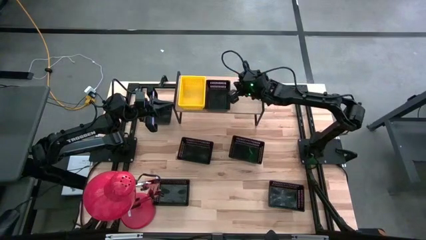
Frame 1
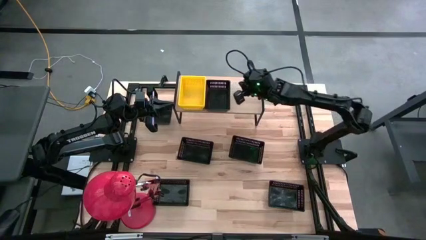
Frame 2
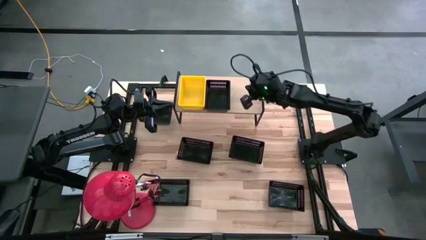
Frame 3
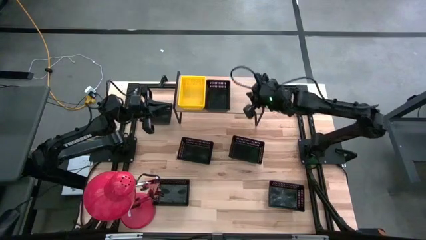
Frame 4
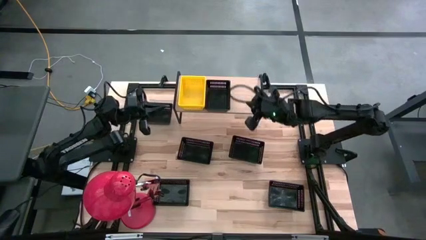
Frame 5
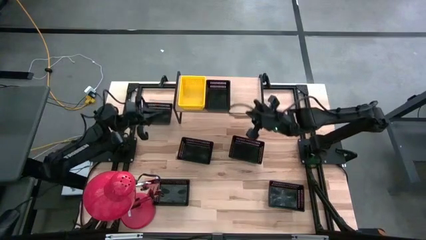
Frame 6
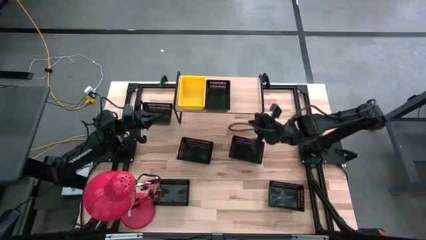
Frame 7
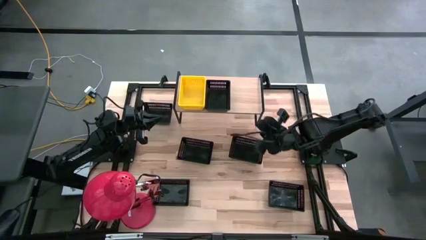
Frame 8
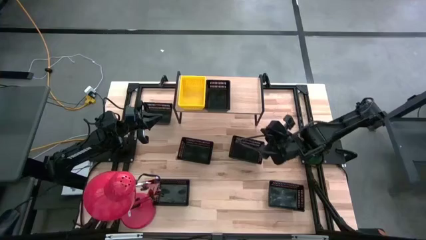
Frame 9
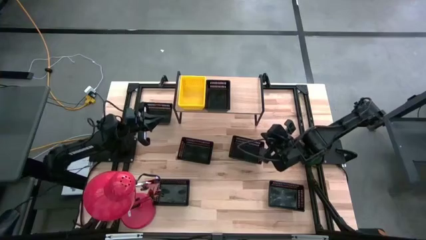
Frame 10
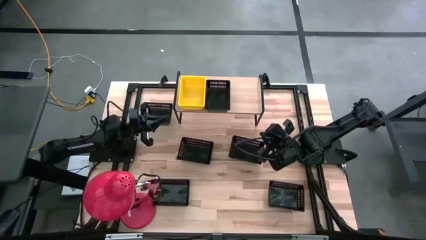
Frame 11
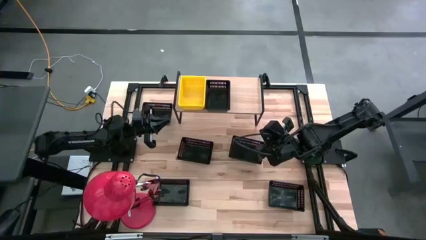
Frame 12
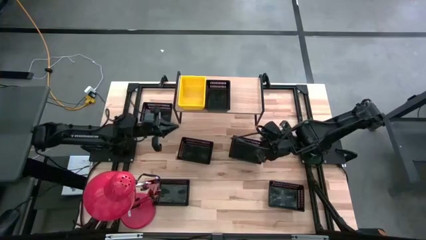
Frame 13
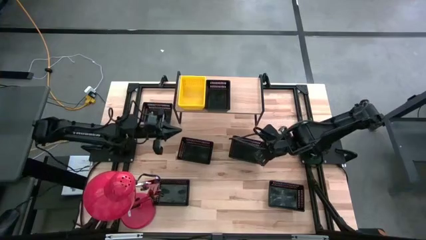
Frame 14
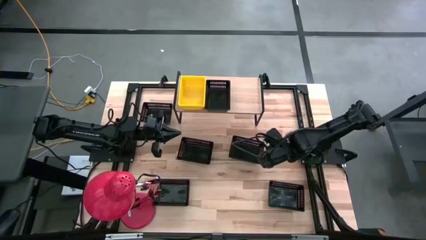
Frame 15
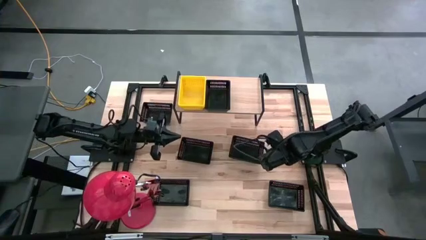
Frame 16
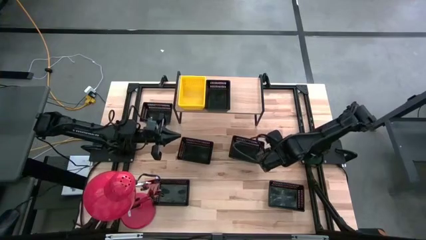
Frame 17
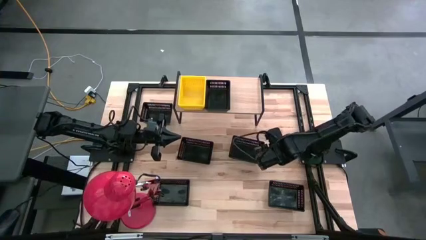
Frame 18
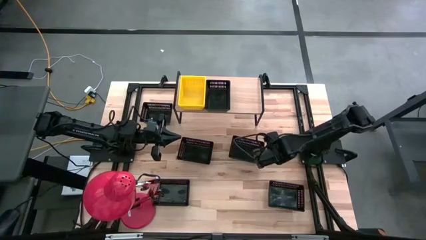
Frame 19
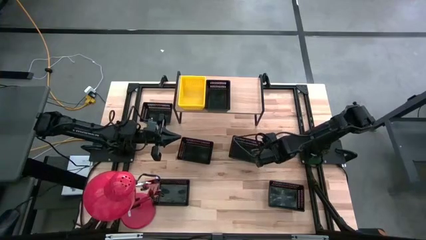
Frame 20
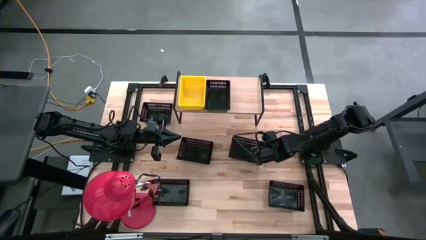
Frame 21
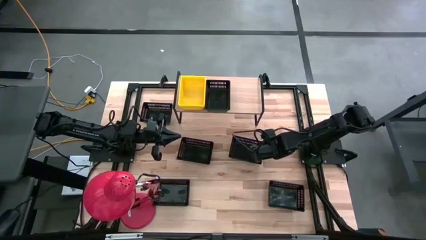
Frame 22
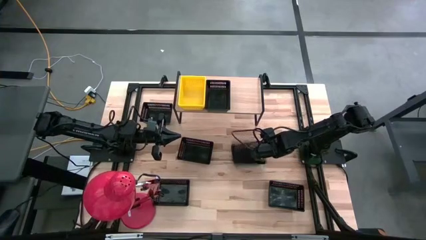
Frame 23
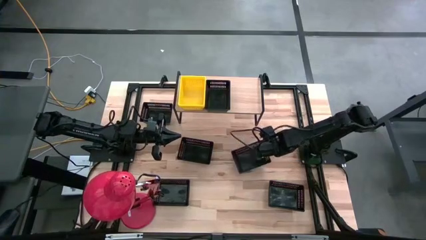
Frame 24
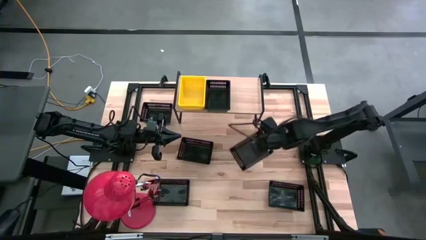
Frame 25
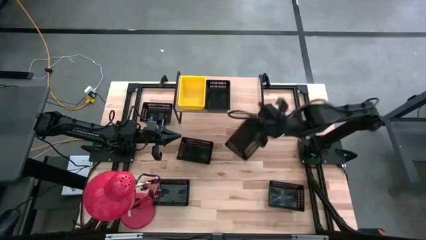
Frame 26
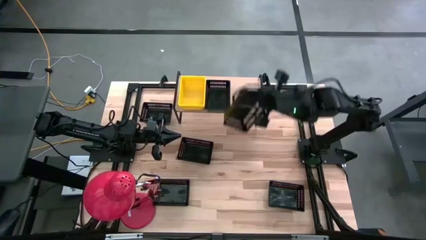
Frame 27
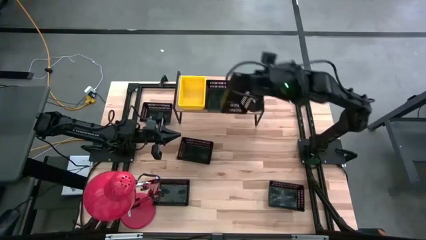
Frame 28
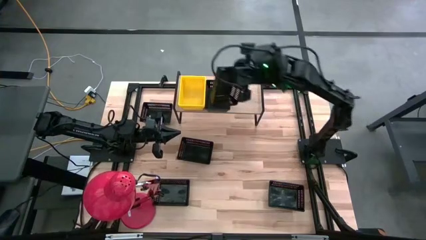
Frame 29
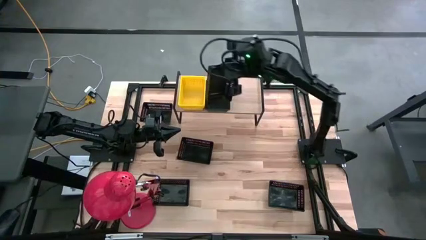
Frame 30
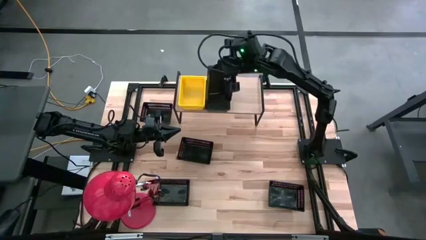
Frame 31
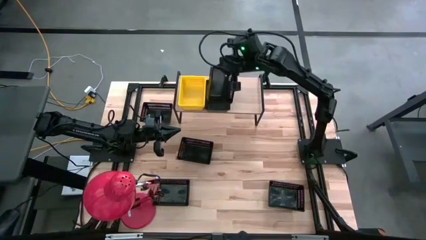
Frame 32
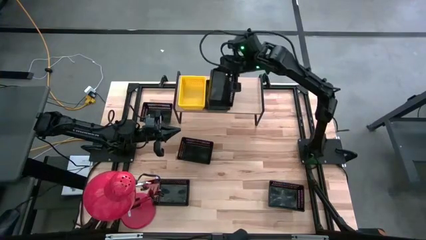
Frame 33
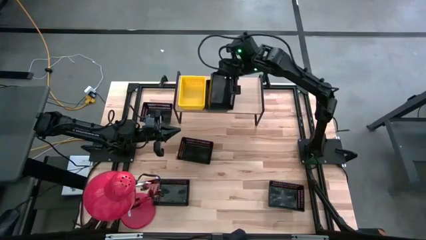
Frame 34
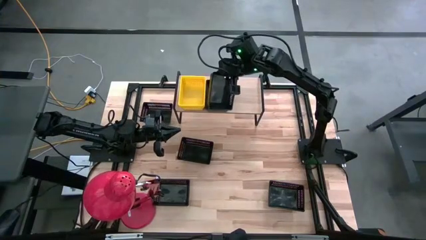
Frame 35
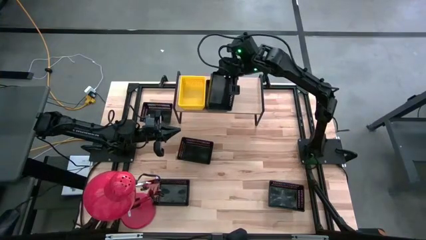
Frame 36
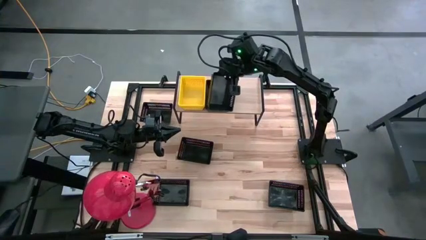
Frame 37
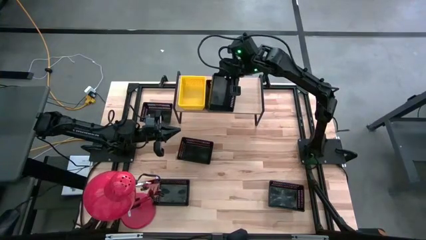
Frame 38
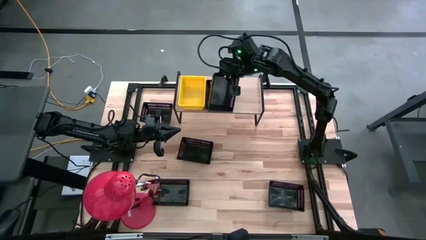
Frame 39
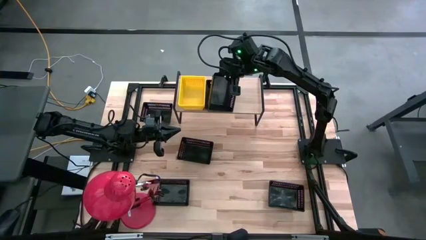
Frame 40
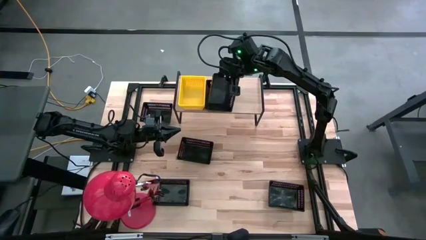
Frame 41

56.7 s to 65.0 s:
Task: Stack baskets on shelf by color
Stack the black bin on the black bin on the shelf

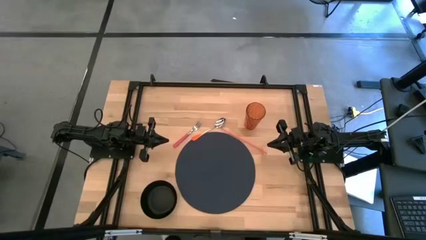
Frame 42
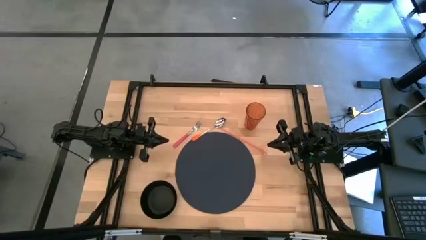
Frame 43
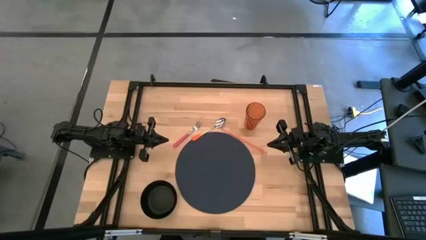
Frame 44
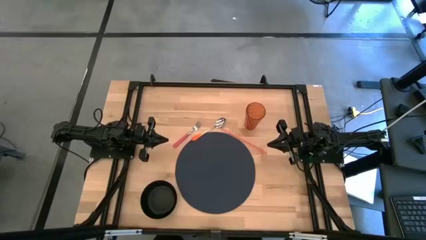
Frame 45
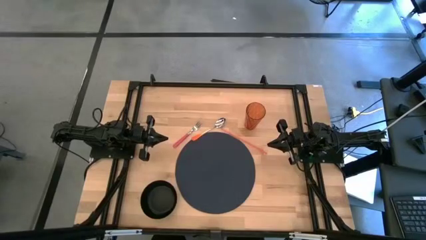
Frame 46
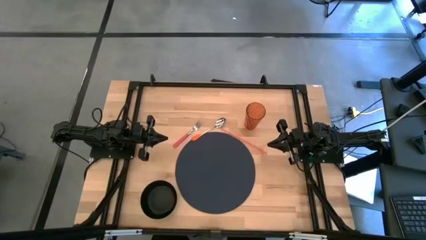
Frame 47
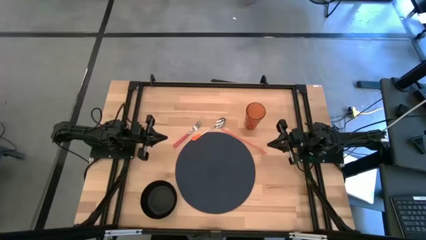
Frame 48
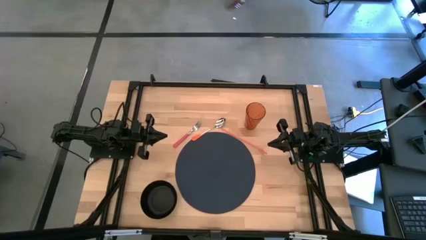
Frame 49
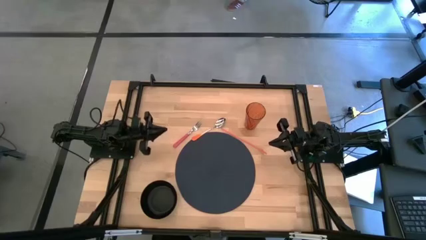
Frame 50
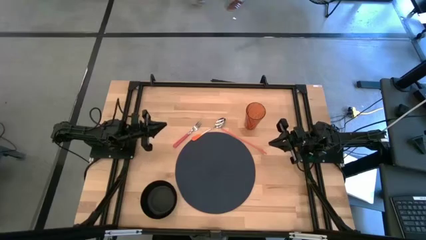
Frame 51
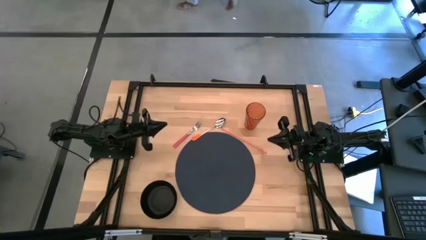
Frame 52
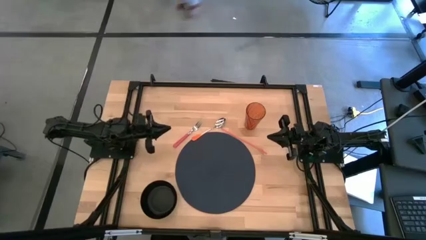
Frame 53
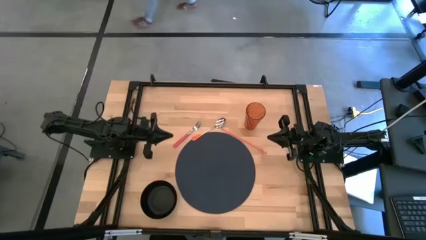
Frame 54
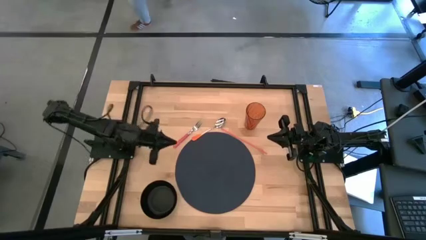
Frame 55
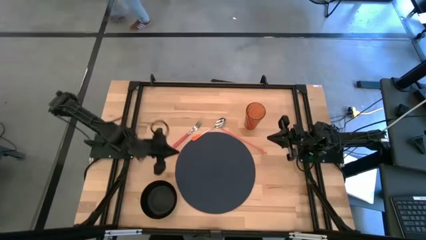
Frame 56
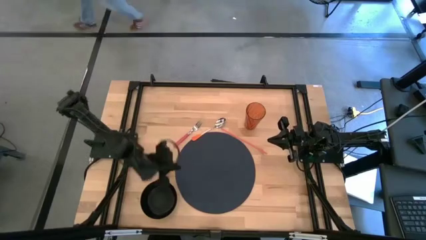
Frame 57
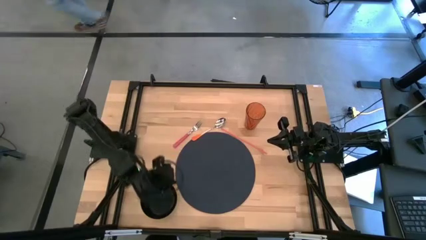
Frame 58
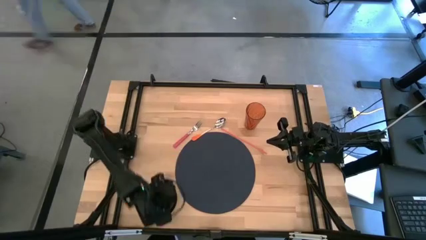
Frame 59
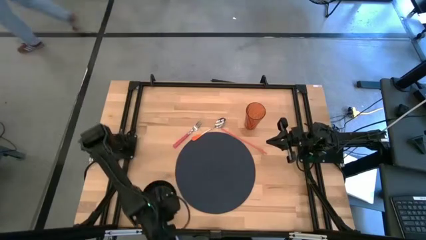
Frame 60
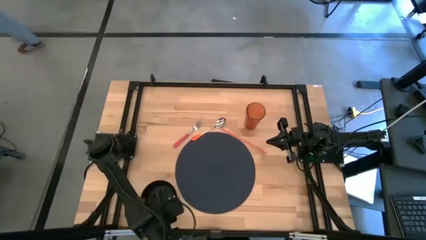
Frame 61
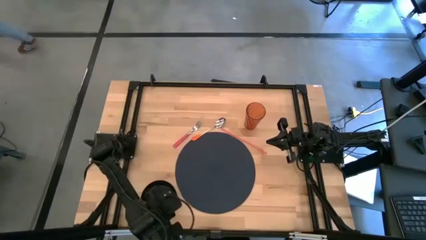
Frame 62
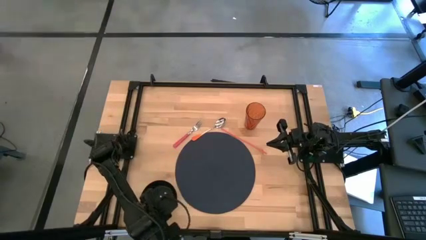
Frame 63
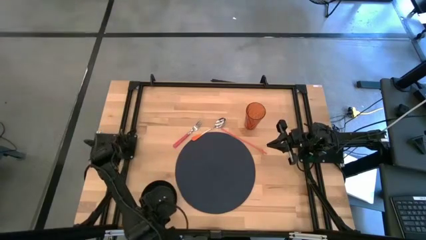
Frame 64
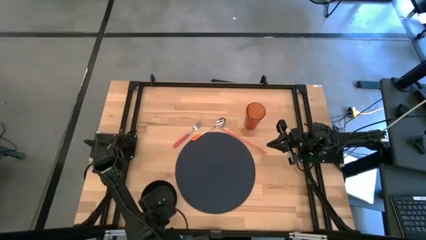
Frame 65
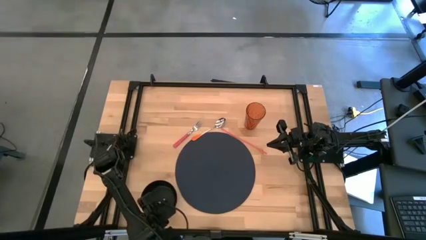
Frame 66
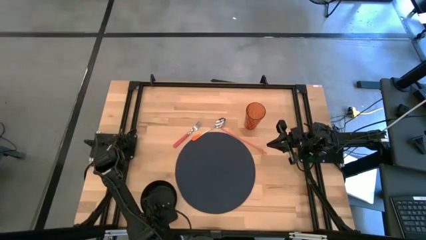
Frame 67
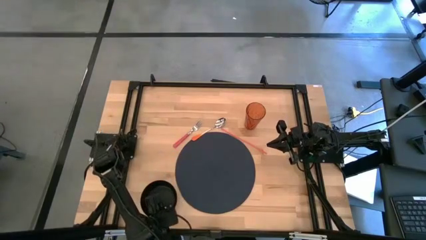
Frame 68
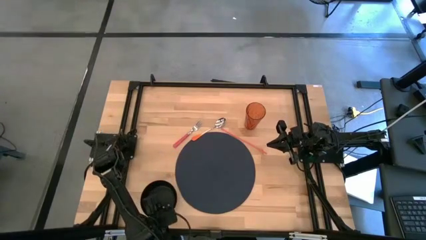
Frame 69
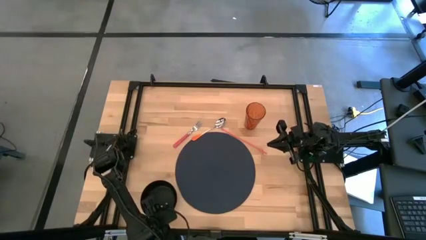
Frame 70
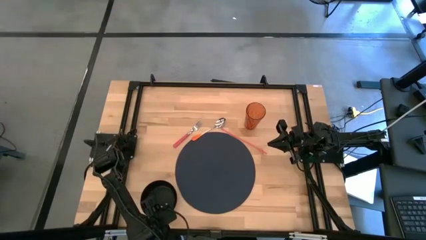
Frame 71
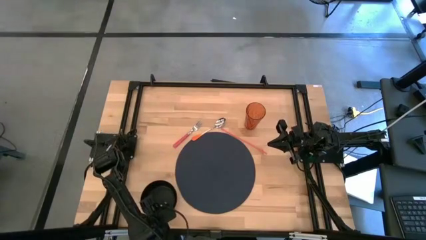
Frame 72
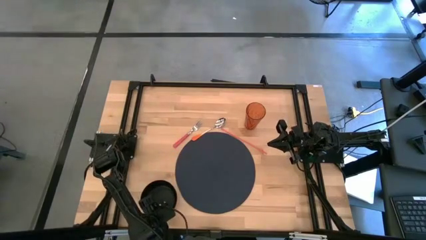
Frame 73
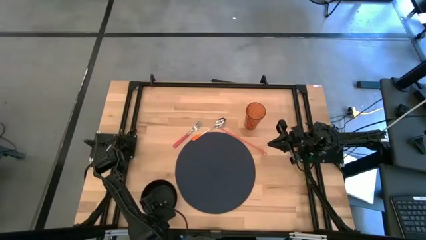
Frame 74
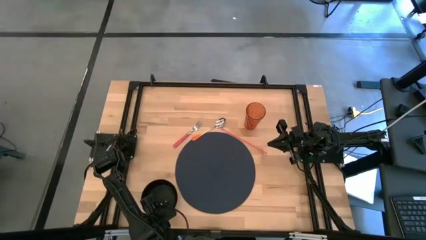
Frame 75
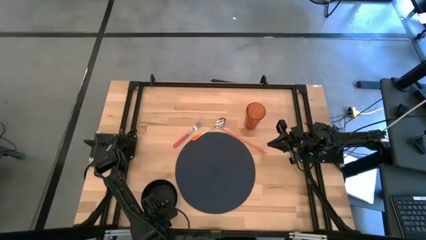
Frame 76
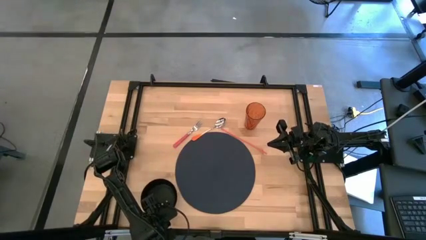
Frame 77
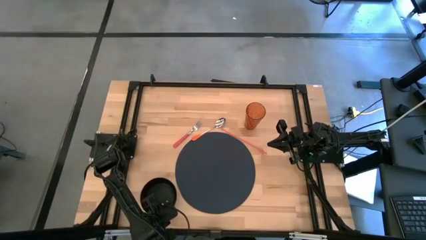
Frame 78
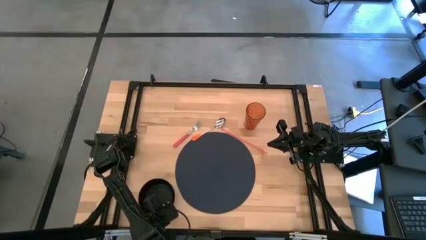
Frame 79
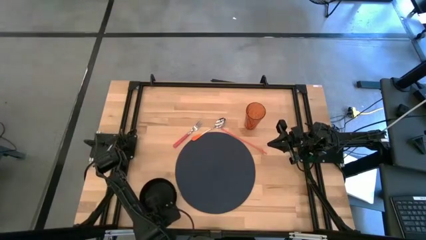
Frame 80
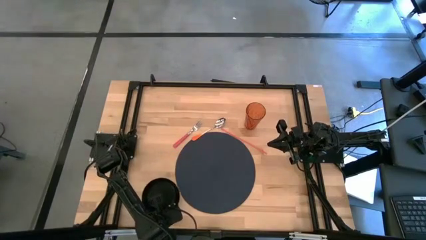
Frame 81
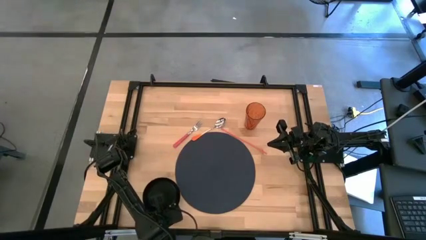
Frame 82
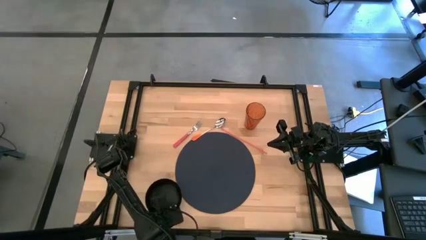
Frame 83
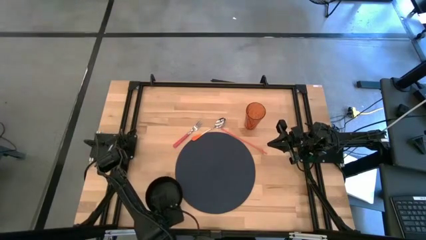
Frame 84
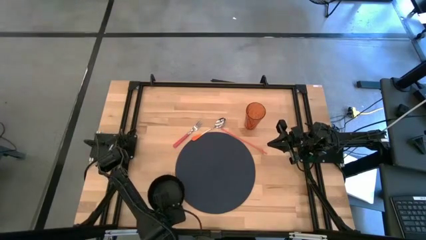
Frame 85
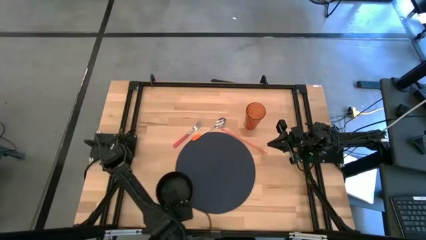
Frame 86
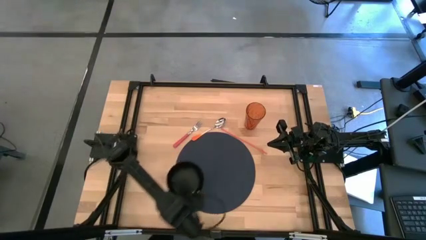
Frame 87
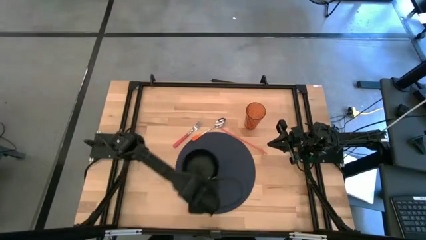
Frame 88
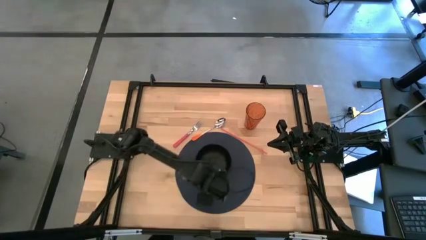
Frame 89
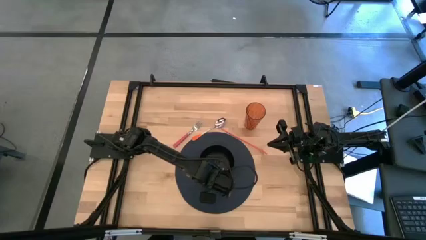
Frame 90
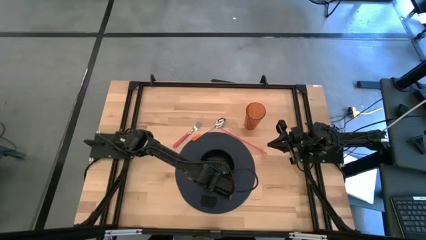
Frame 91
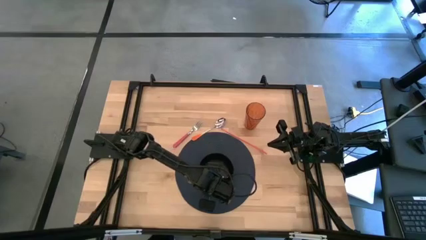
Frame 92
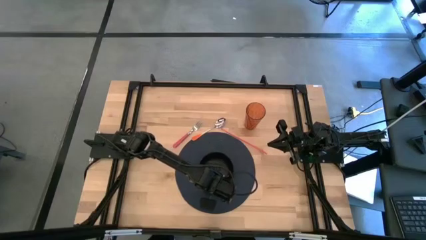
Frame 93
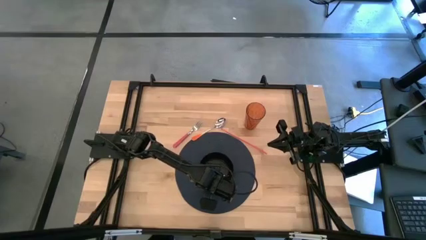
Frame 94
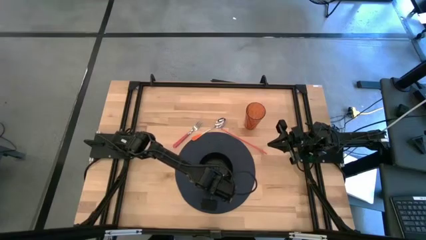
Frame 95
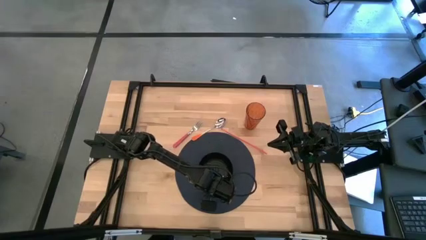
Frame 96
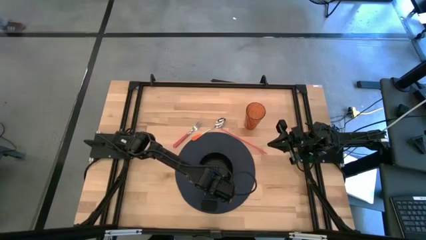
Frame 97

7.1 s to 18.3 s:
Task: Pick & Place Utensil
Put the black bowl on the mat
